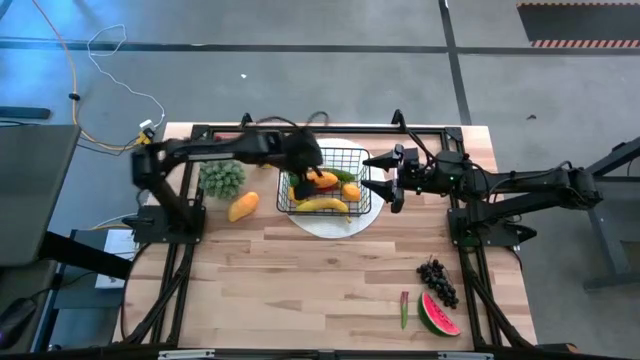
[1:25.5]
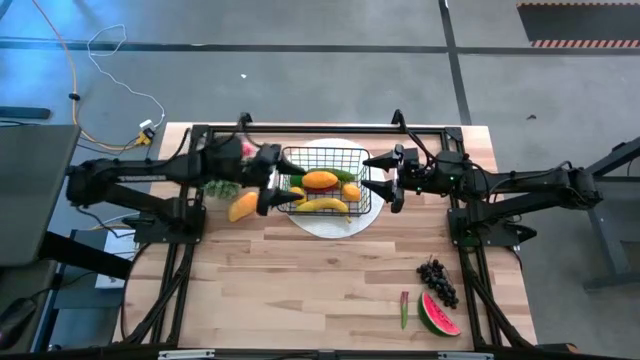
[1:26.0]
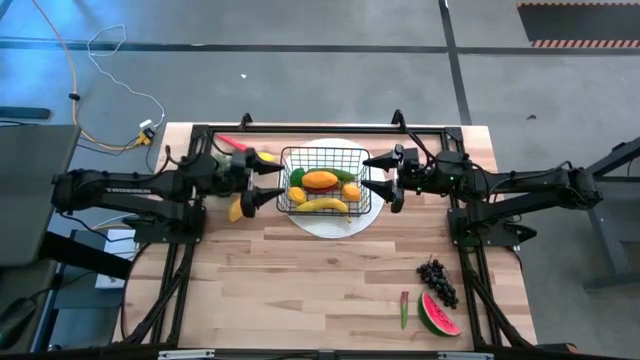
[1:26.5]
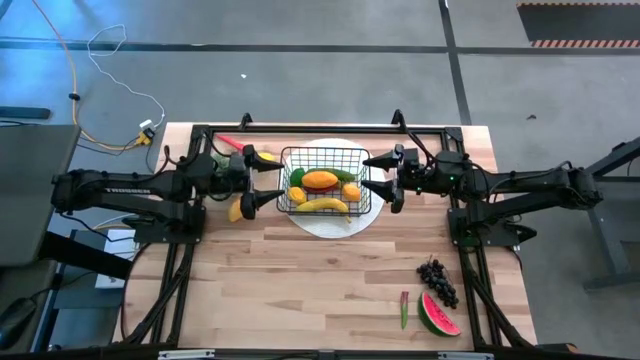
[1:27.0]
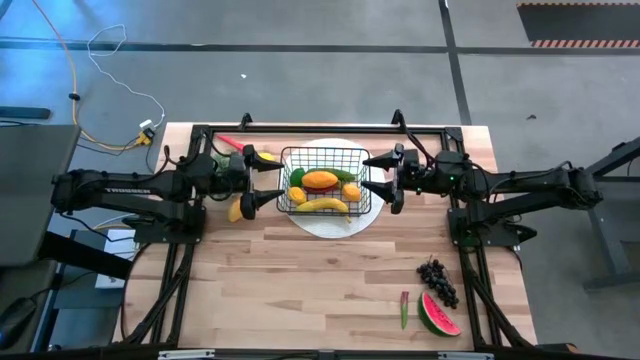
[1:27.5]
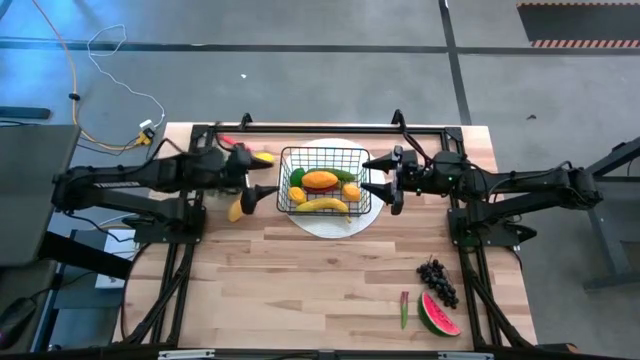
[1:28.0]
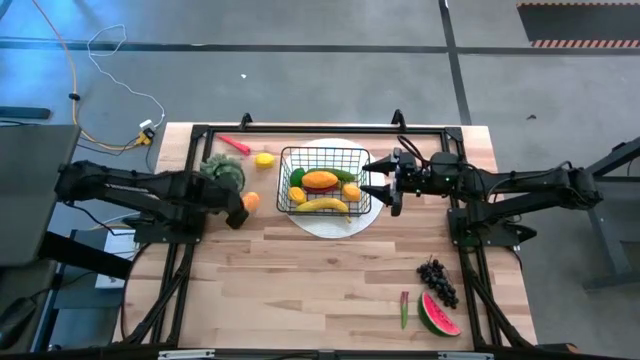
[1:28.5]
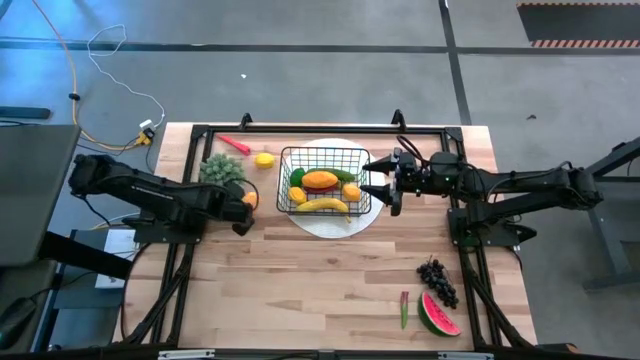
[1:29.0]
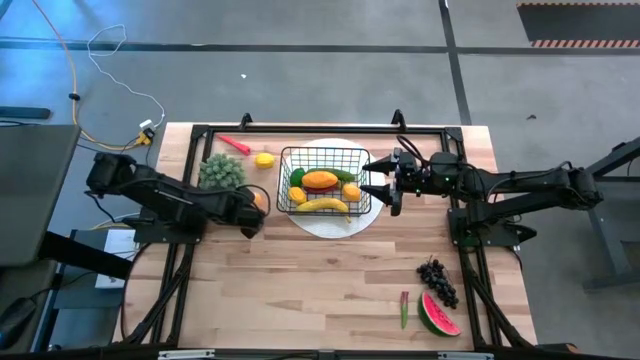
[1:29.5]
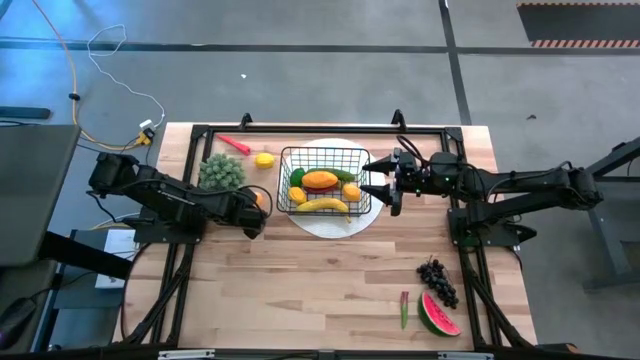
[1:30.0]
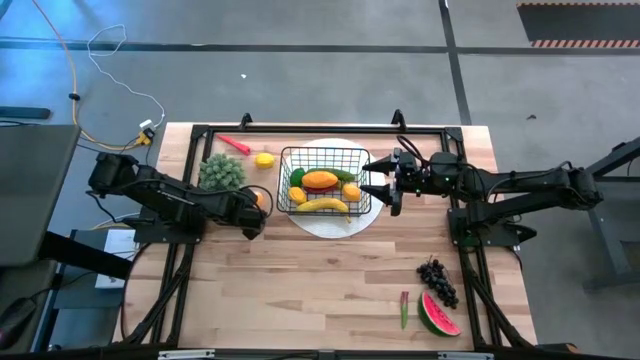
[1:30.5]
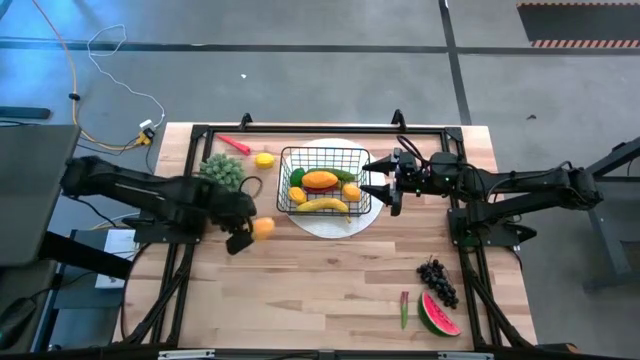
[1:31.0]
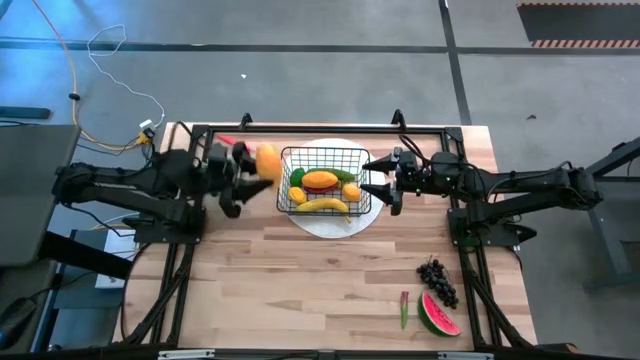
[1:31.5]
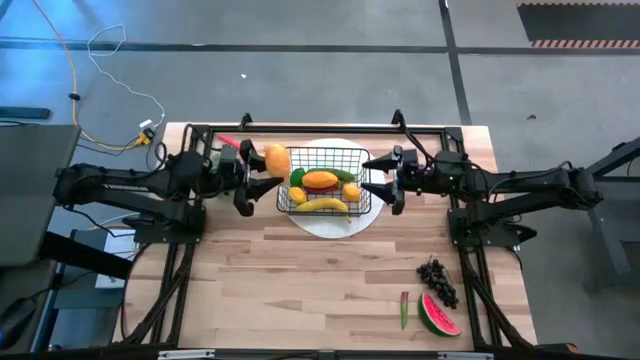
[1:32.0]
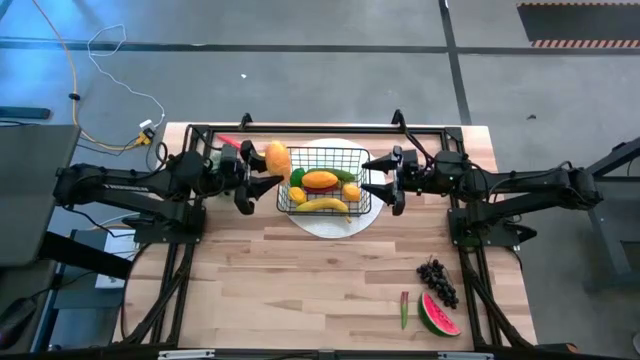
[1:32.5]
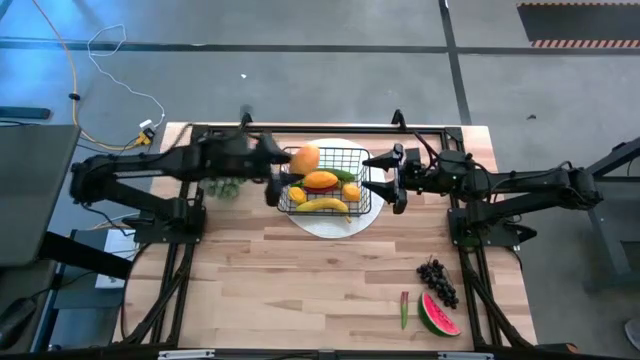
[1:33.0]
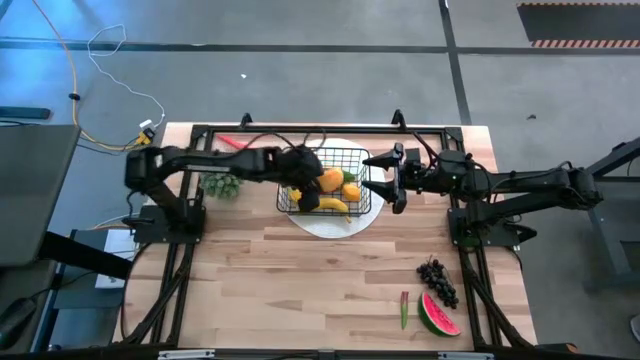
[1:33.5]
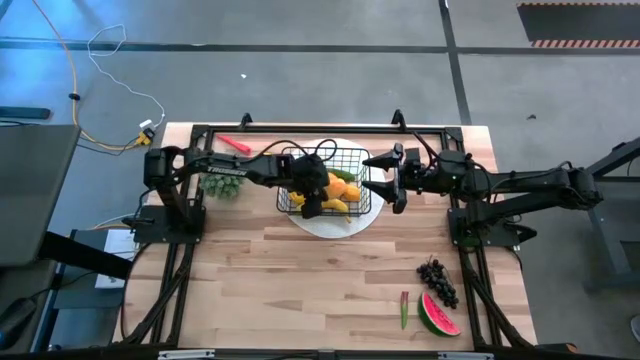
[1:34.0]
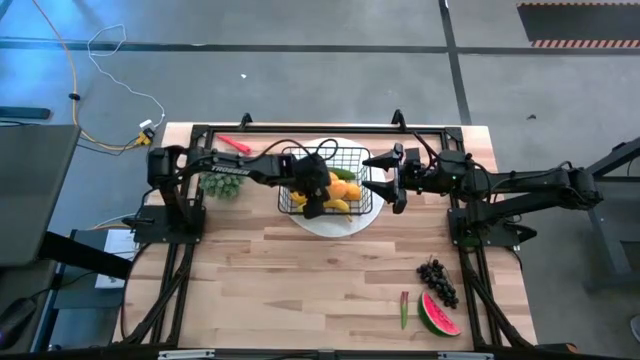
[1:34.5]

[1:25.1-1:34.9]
Task: Build produce basket
Put the yellow mango into the wire basket

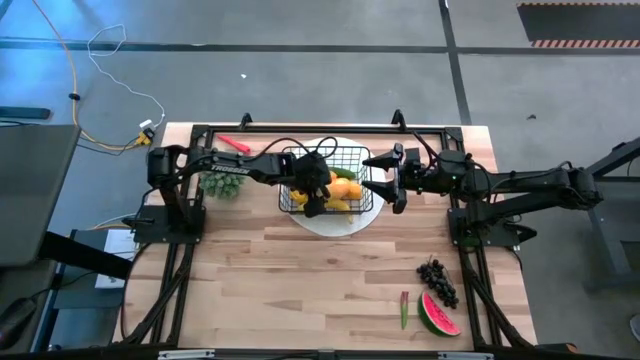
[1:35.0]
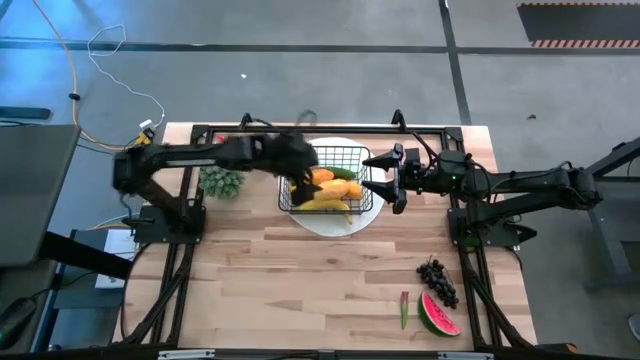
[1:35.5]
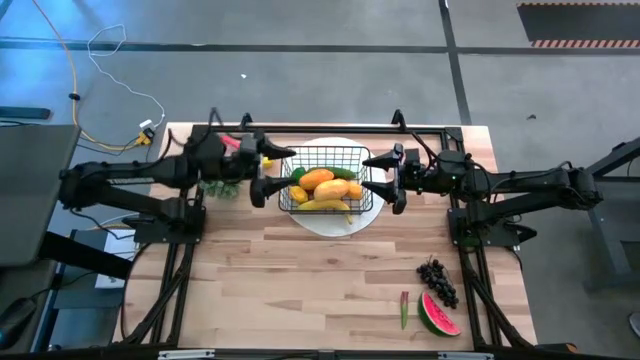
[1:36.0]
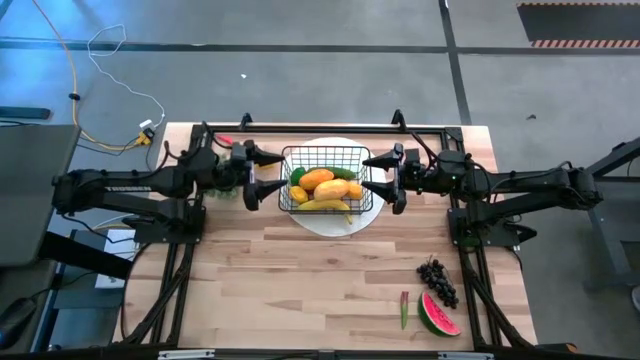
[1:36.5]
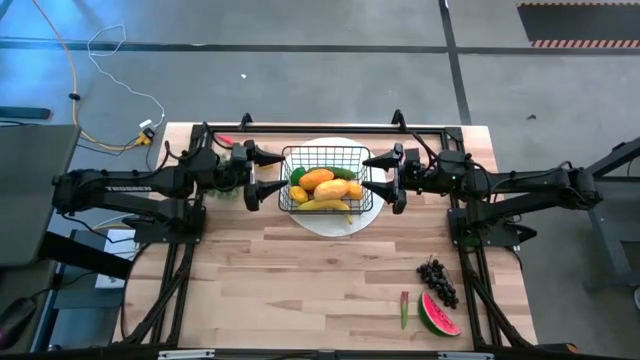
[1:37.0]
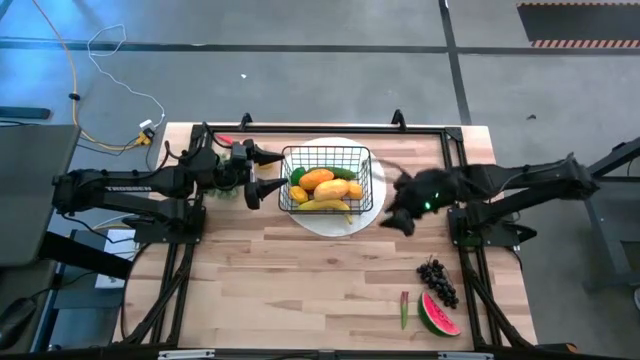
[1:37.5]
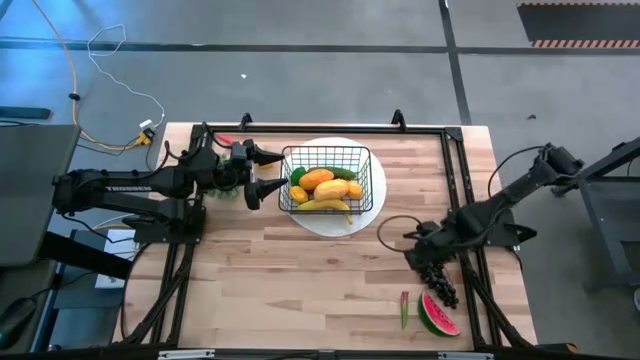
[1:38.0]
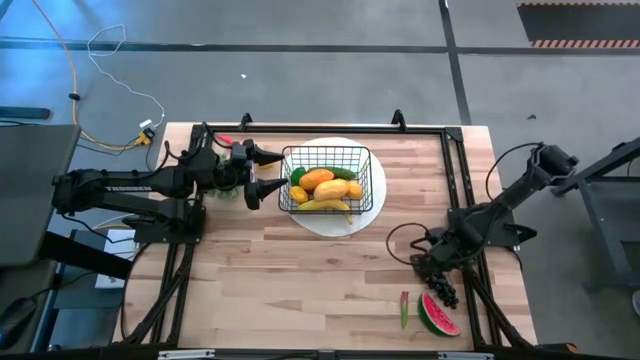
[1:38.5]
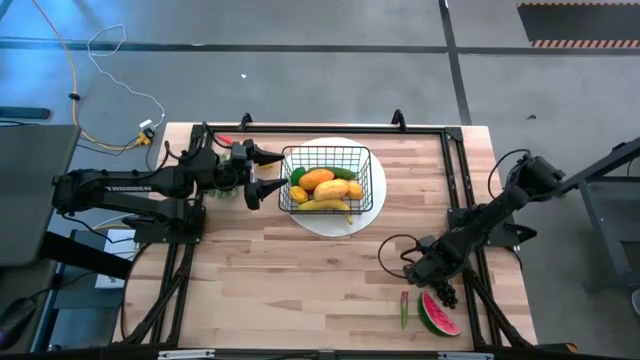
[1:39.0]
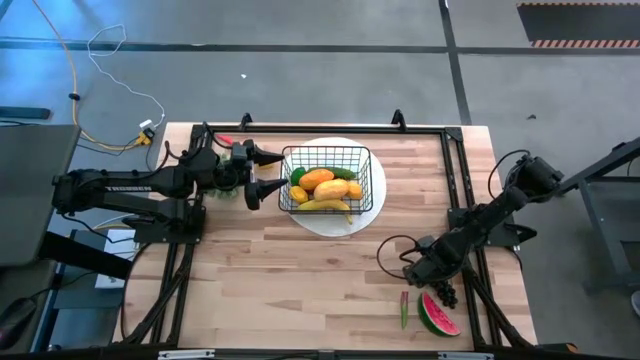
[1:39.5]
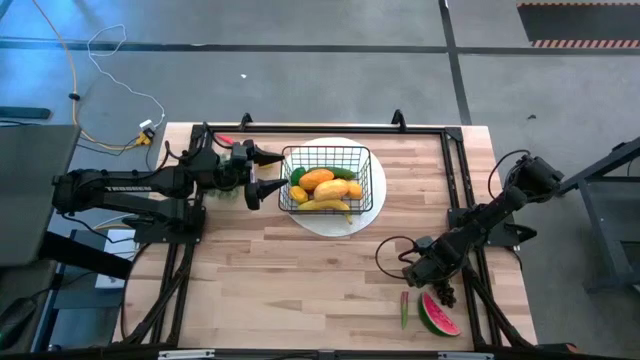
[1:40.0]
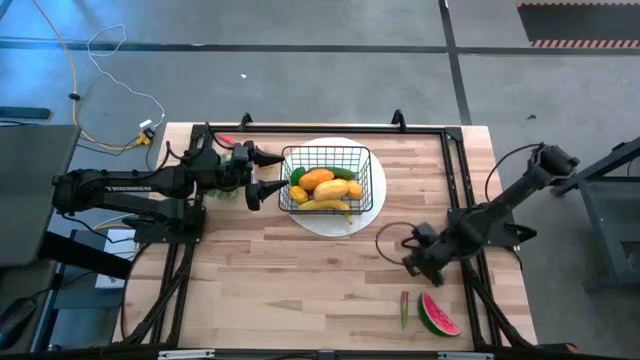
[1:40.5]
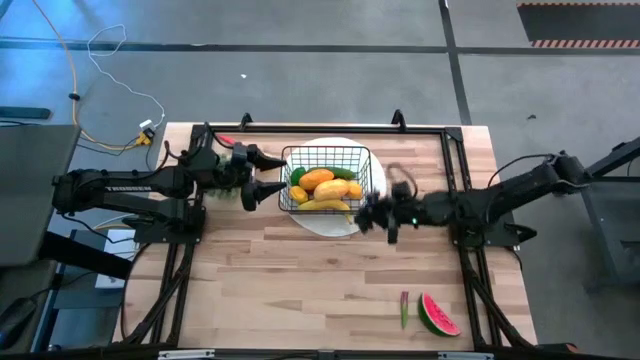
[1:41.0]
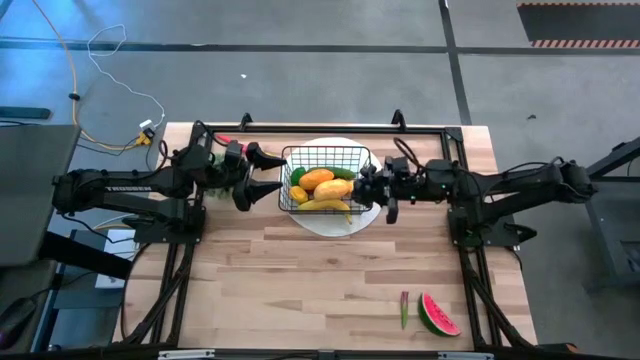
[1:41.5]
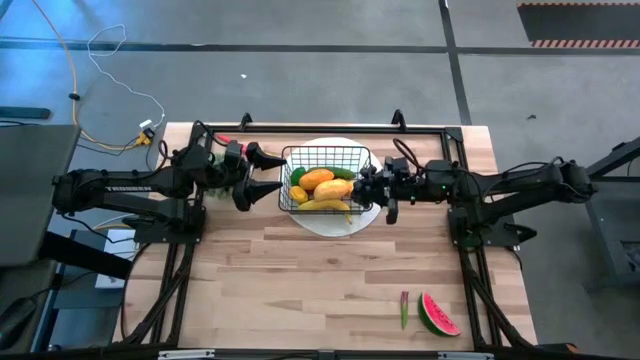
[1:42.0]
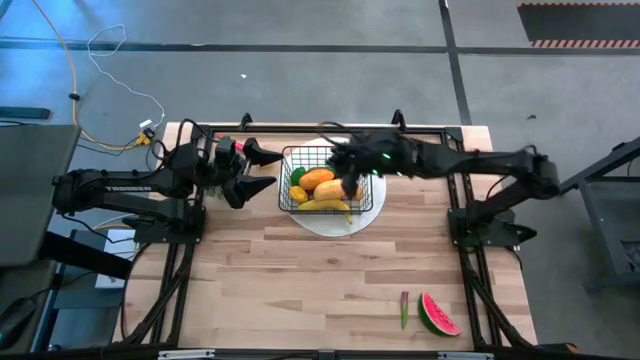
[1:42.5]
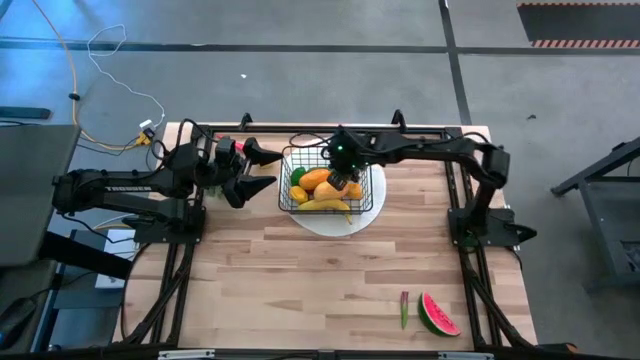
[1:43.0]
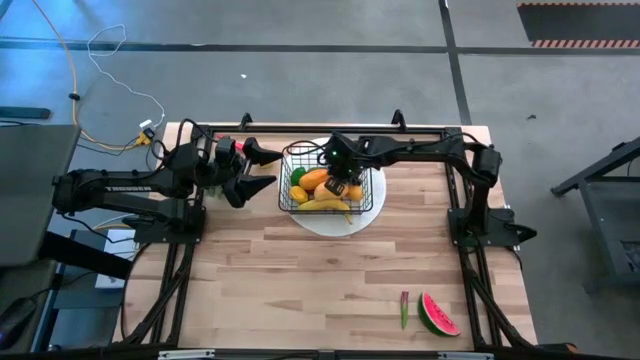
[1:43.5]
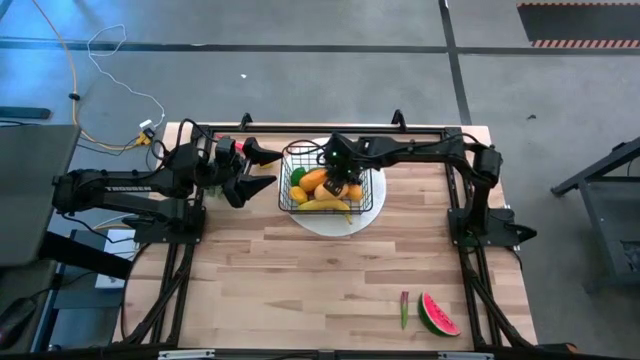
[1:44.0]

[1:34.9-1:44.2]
Put the purple grapes into the wire basket

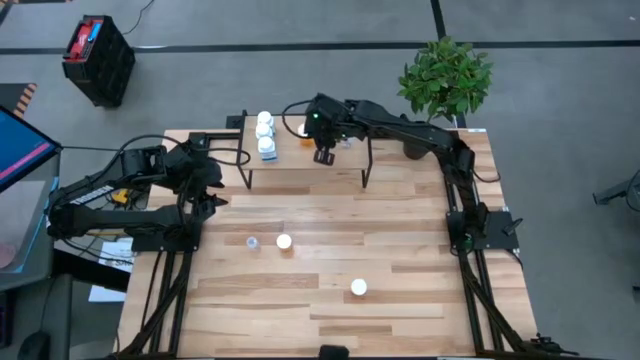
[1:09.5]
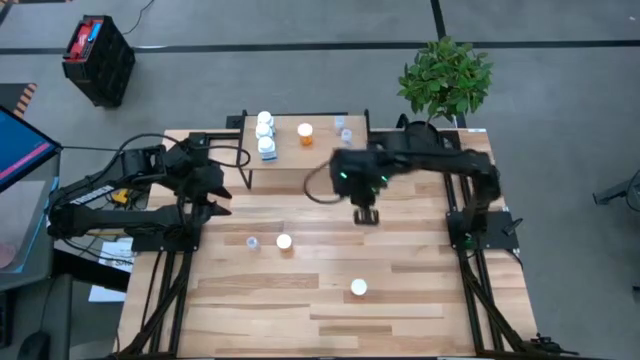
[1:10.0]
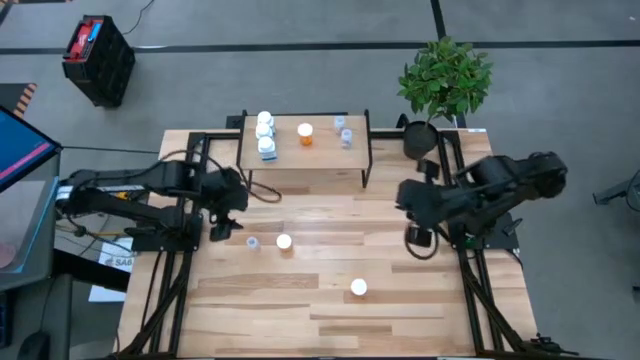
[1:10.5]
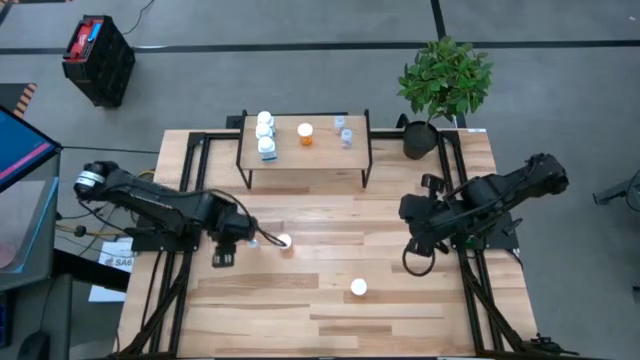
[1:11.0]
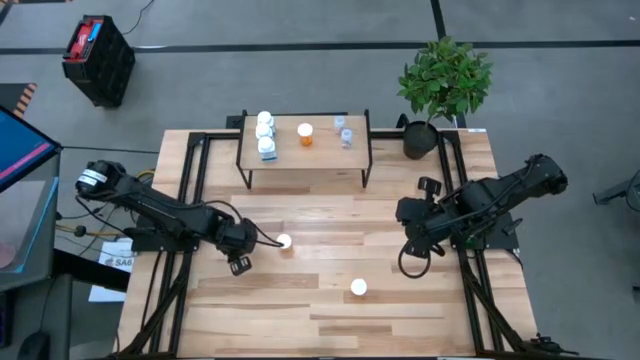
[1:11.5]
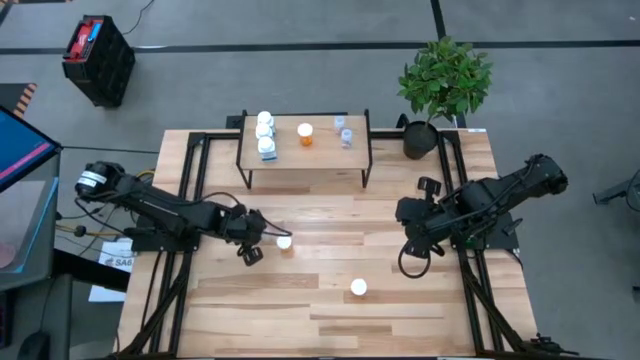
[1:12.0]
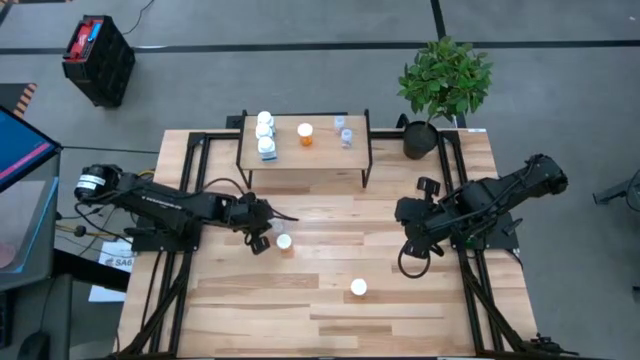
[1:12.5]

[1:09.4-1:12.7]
Task: Pick and place medicine bottles onto shelf by color
Adjust the transparent pill bottle on the table
